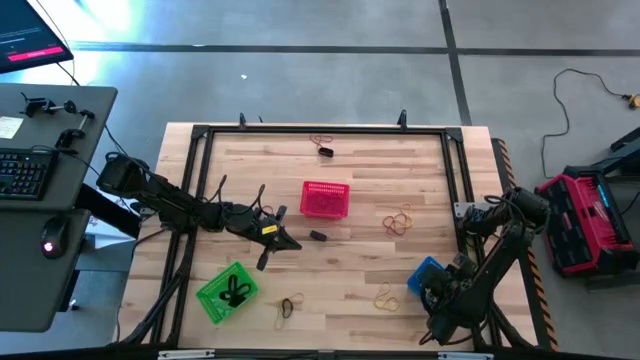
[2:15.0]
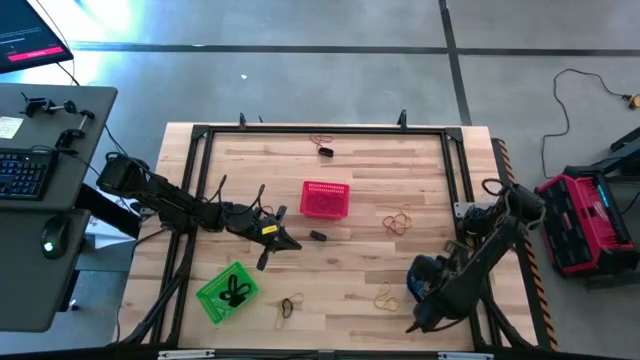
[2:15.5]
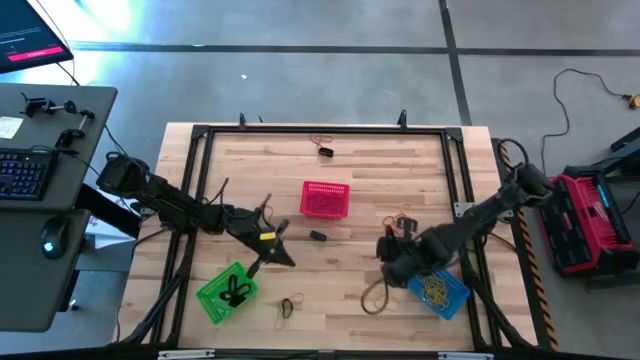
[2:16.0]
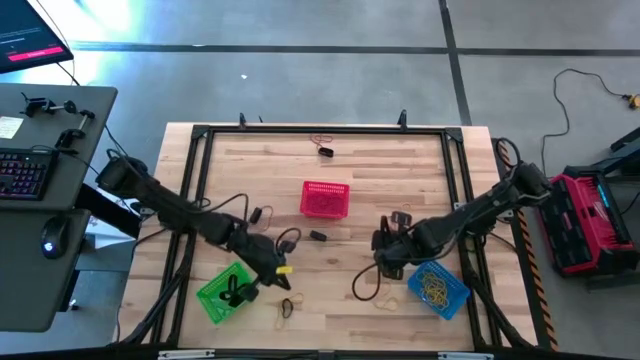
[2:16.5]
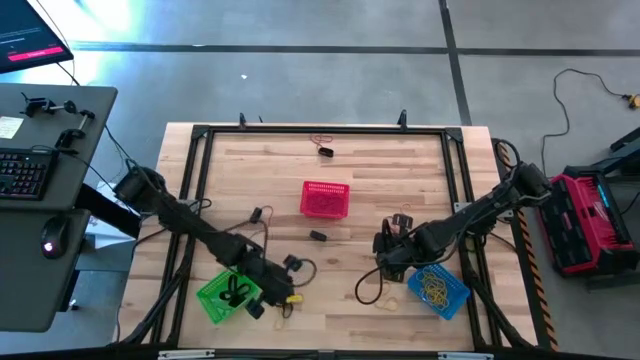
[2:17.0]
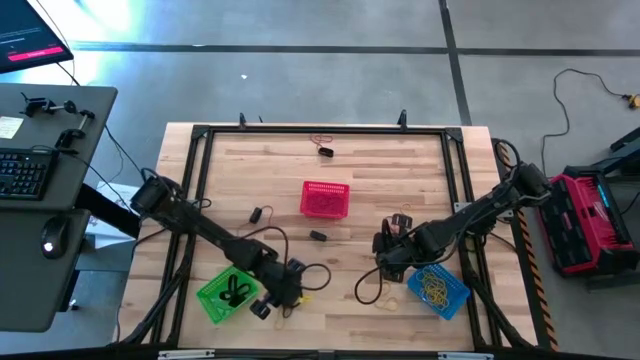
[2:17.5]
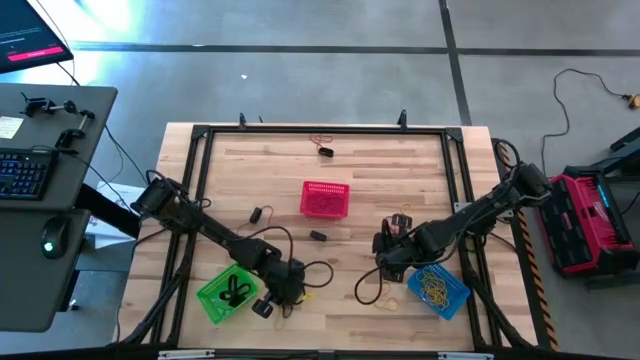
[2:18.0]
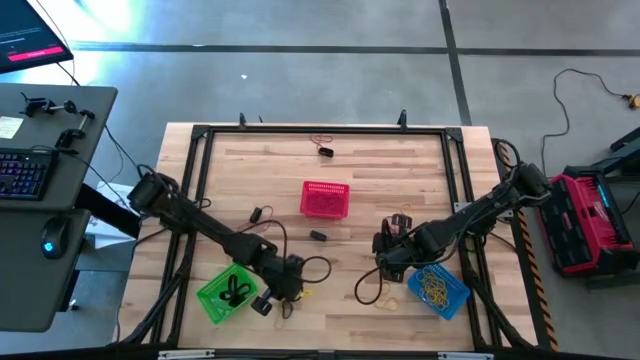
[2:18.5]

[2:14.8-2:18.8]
Task: Sort rubber bands into baskets
Put the black rubber band into the green bin

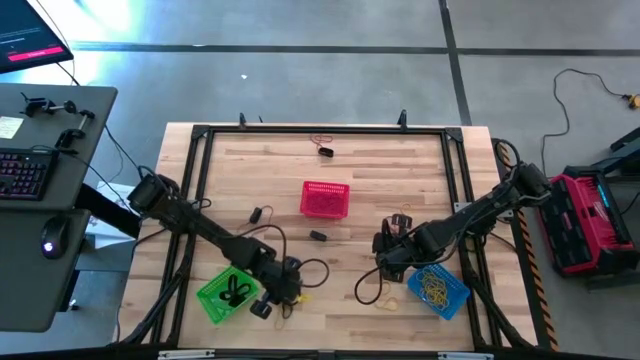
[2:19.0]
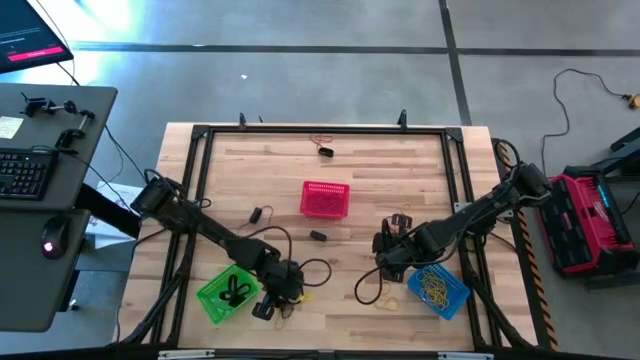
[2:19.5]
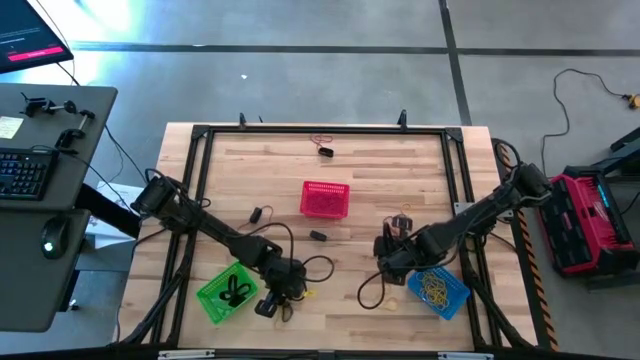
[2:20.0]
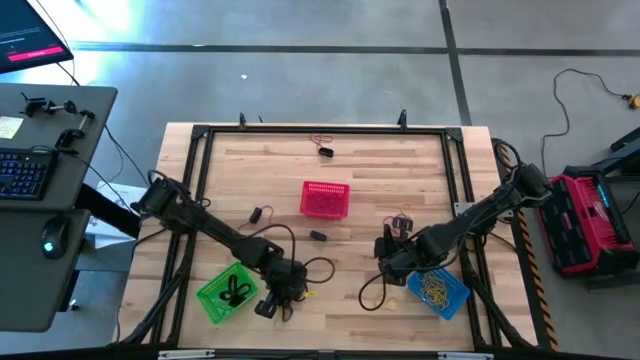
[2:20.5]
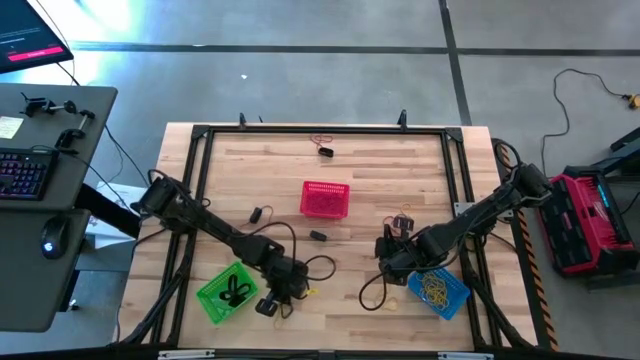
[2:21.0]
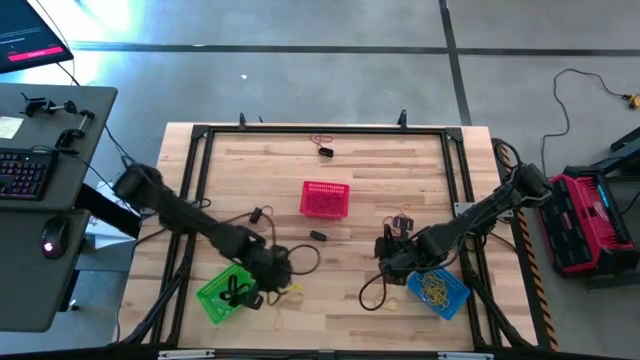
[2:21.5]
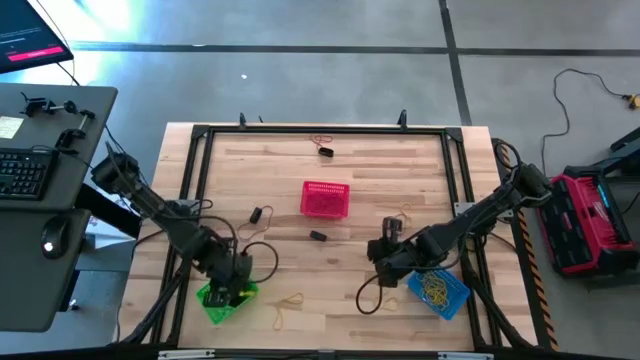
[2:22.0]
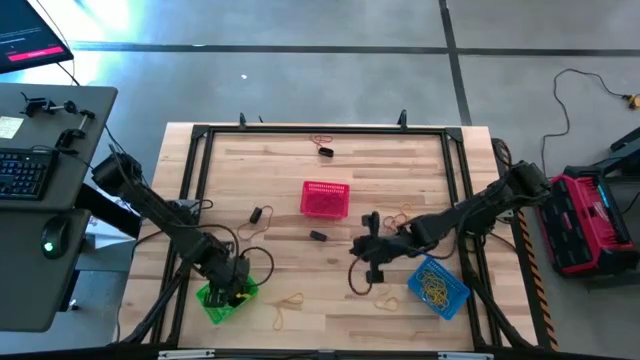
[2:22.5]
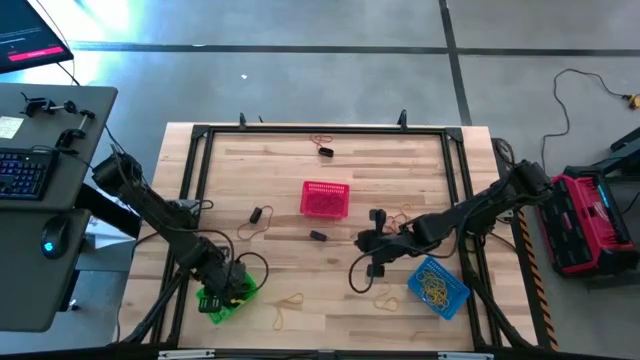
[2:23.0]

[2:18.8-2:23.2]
Put the black rubber band into the green bin

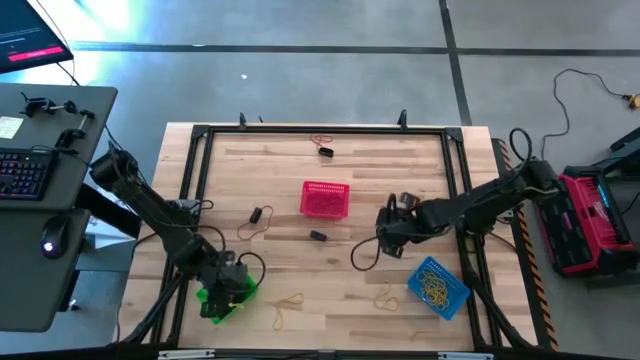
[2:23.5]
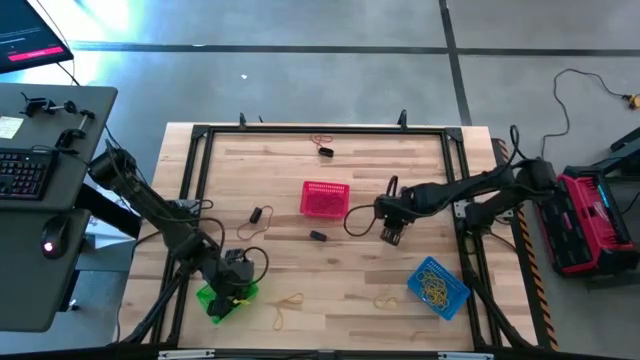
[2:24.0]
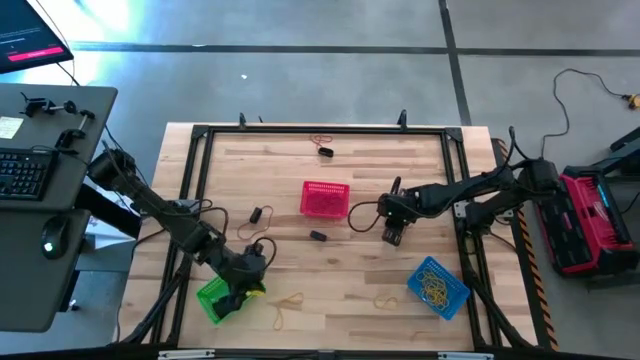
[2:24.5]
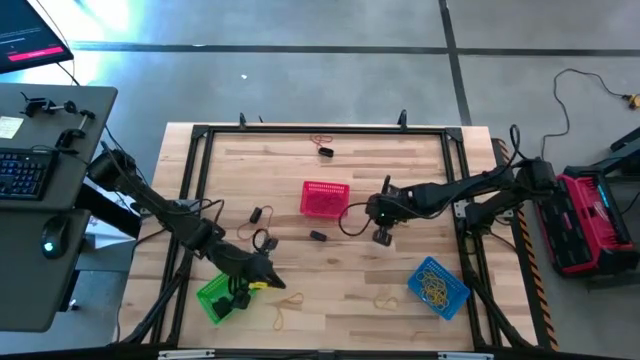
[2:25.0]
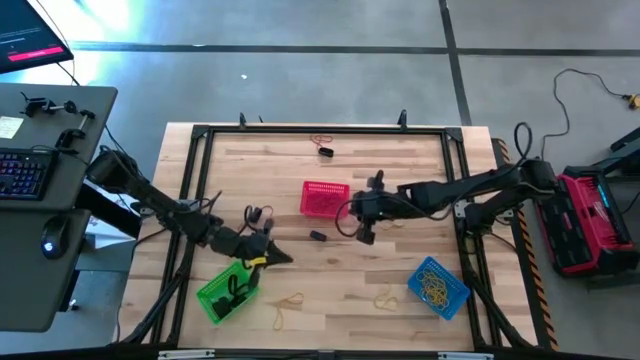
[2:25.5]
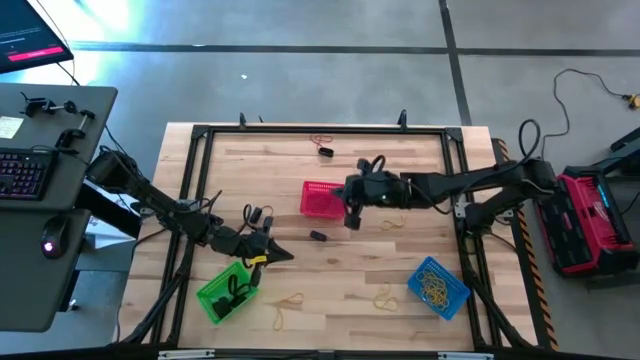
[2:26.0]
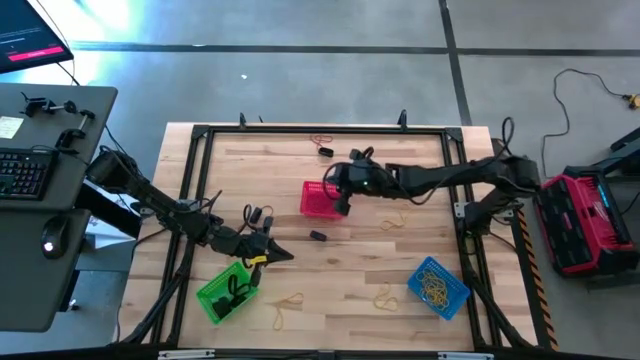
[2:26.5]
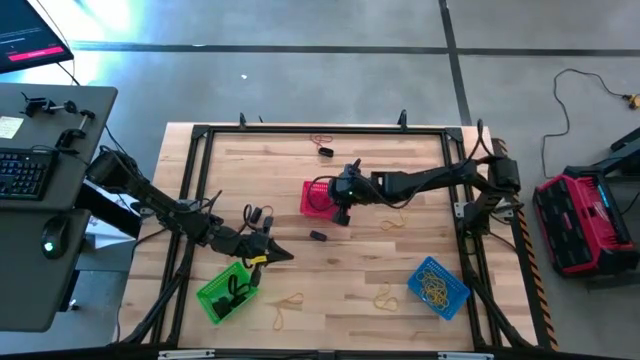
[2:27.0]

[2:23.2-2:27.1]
Put the red rubber band into the red bin

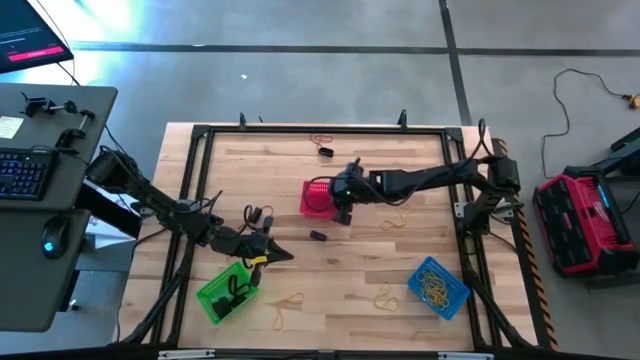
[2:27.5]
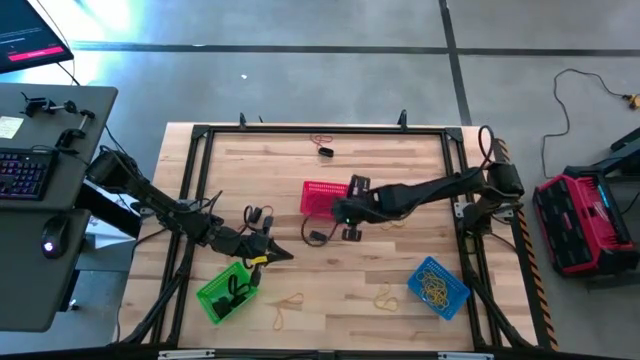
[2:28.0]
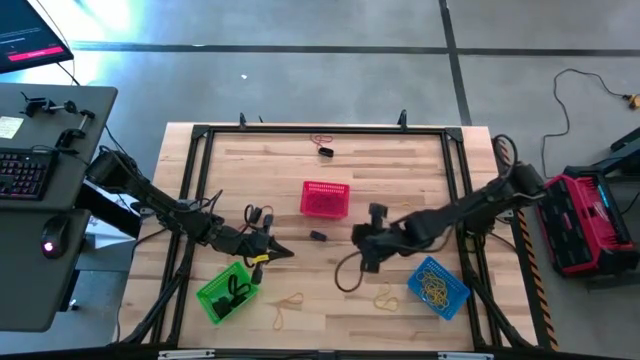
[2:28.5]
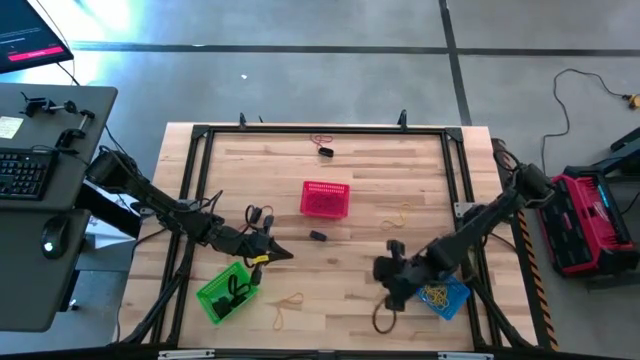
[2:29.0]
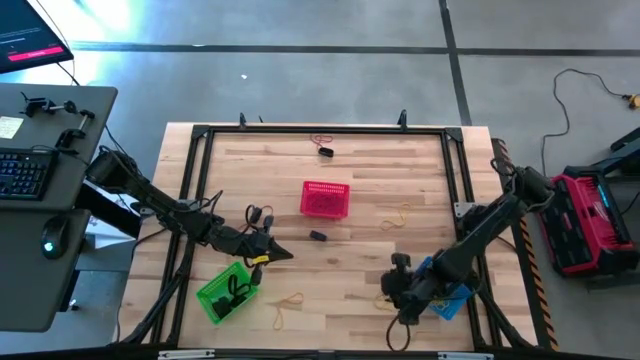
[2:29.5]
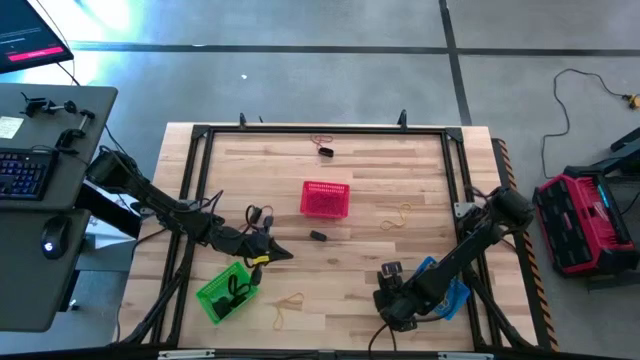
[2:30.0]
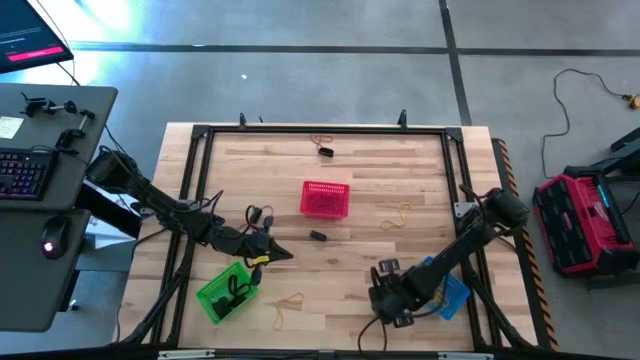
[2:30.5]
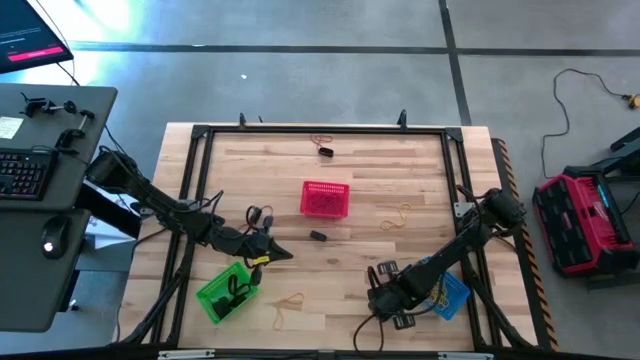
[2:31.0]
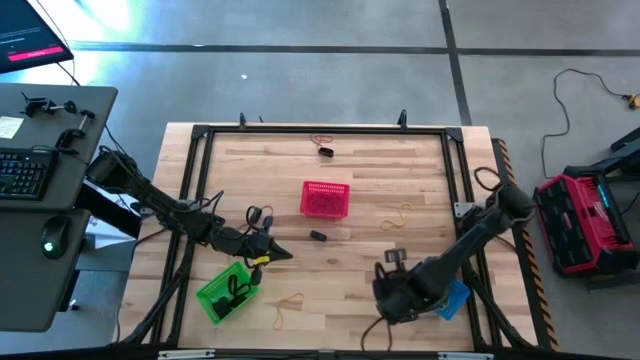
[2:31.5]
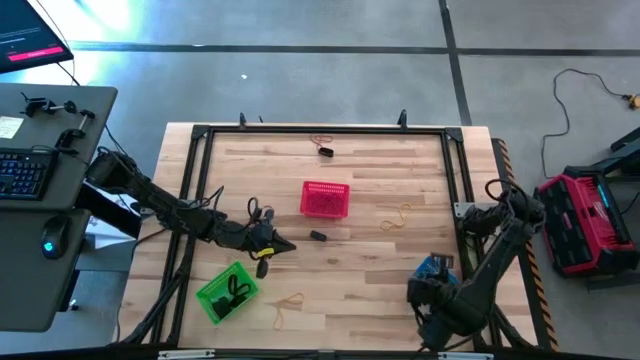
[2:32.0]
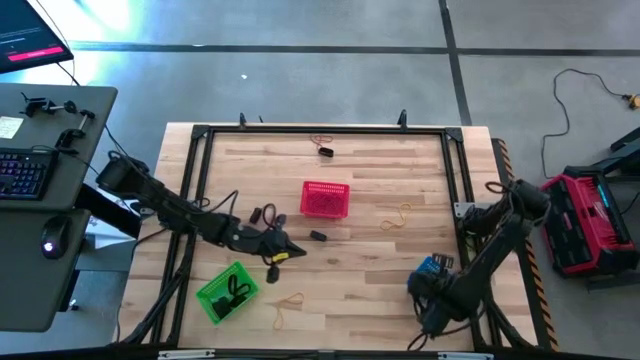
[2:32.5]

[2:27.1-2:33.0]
Put the yellow rubber band into the blue bin

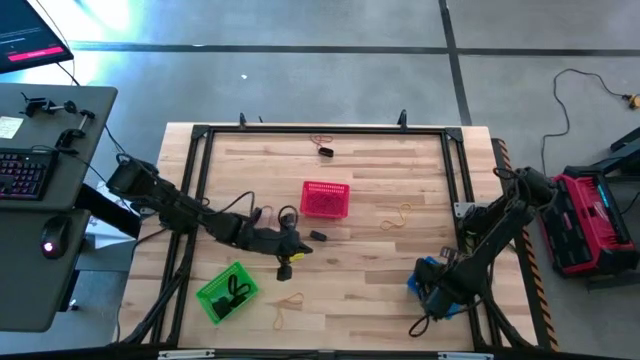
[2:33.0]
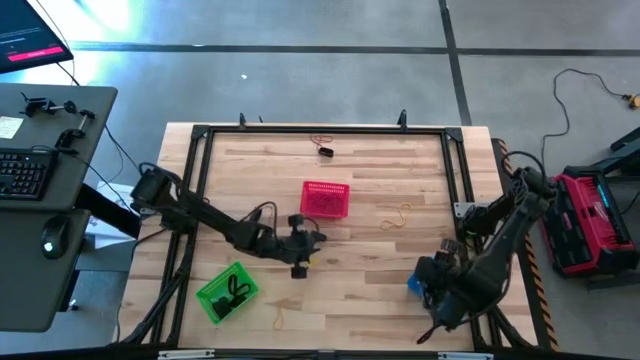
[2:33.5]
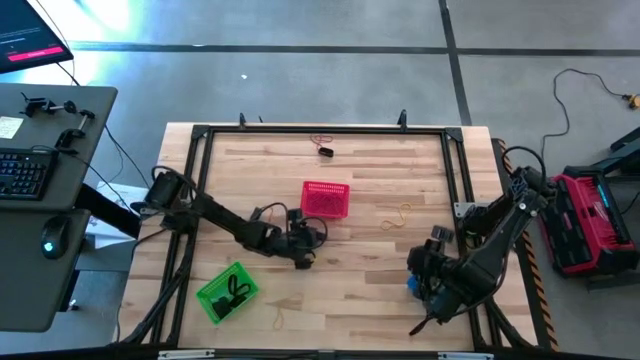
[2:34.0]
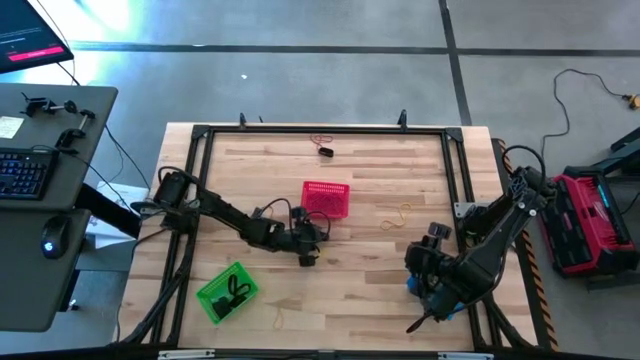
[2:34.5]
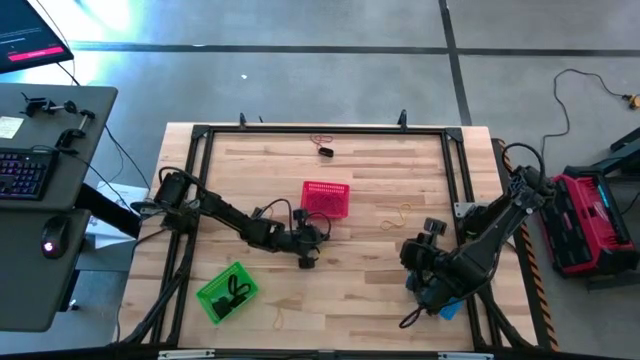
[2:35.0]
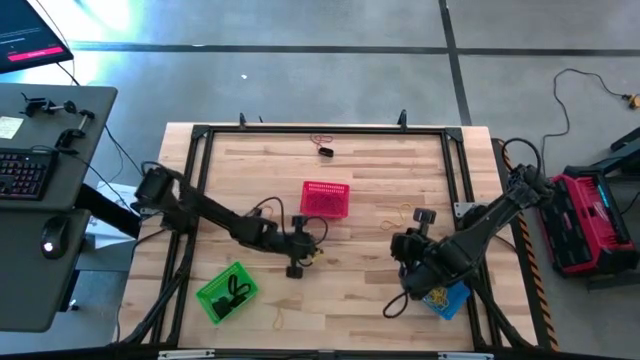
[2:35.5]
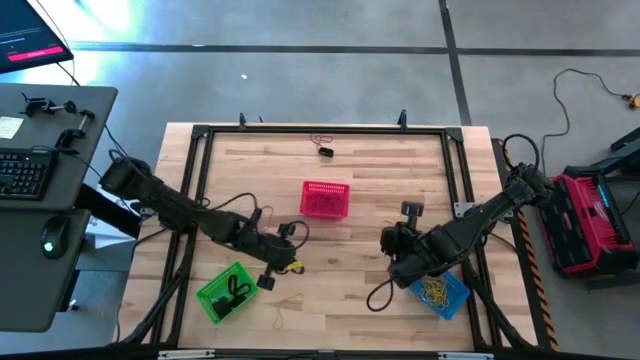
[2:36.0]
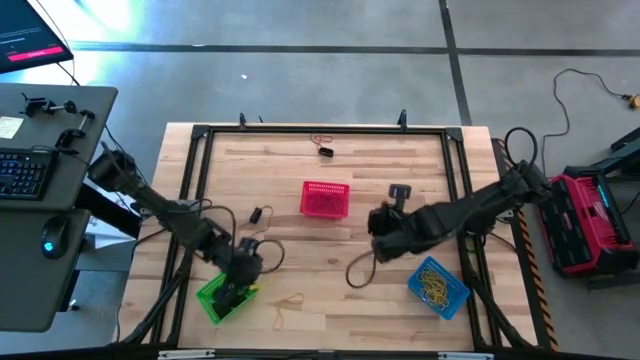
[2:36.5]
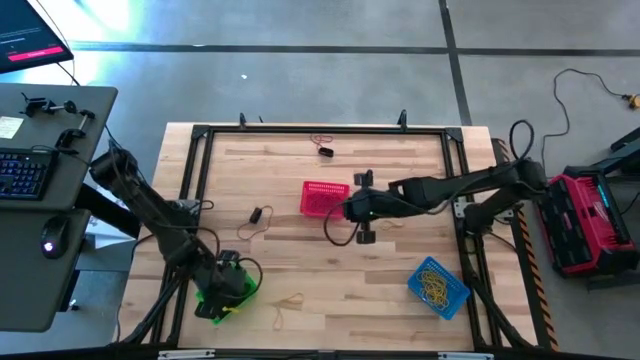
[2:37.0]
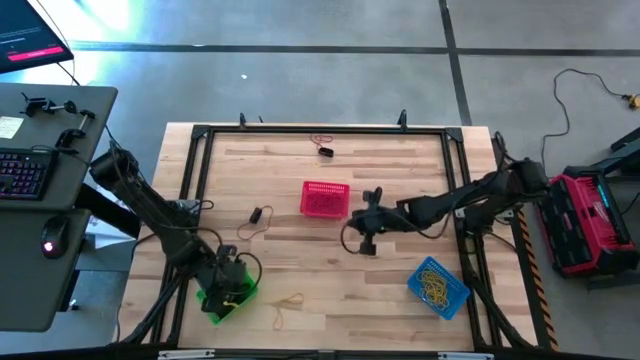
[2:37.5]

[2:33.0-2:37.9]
Put the black rubber band into the green bin
